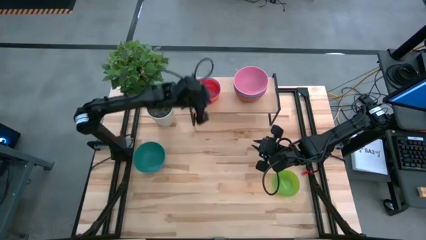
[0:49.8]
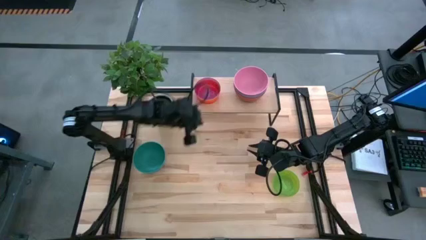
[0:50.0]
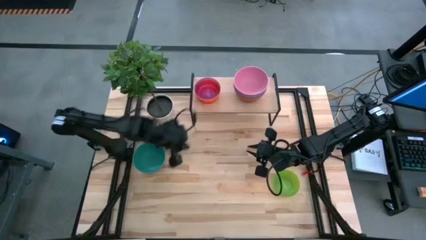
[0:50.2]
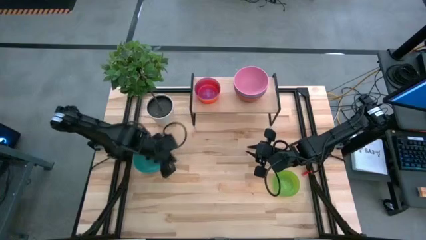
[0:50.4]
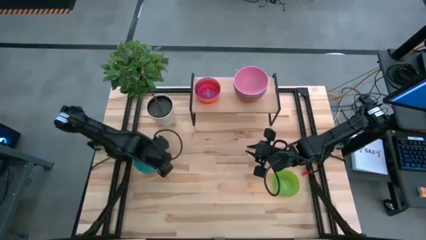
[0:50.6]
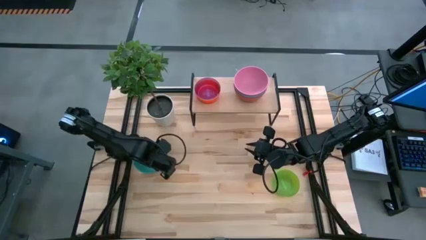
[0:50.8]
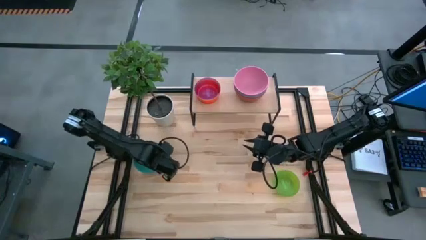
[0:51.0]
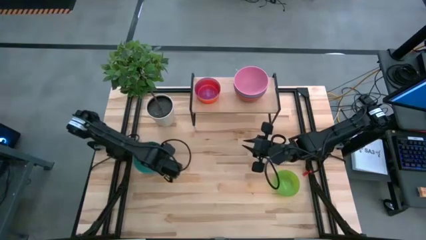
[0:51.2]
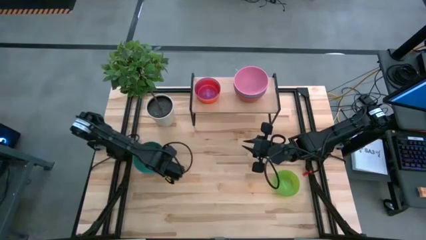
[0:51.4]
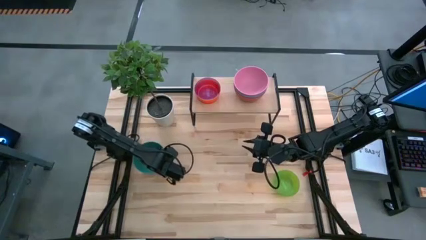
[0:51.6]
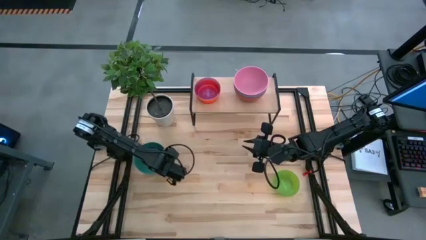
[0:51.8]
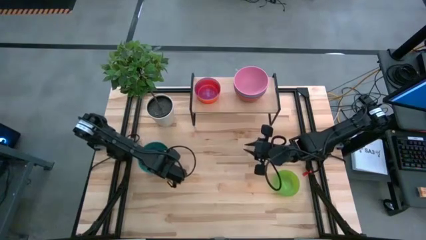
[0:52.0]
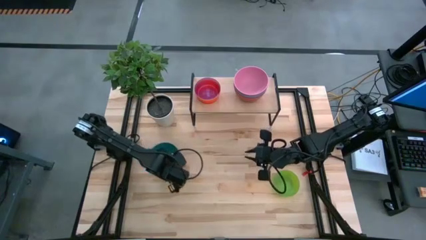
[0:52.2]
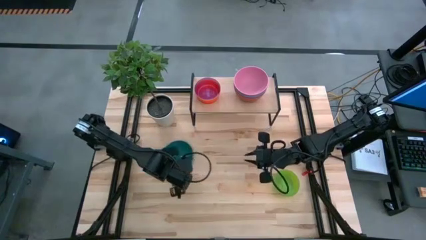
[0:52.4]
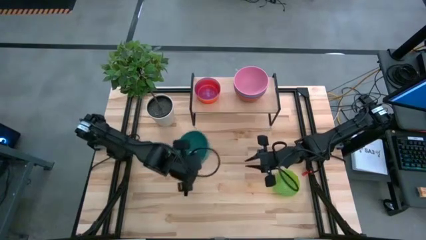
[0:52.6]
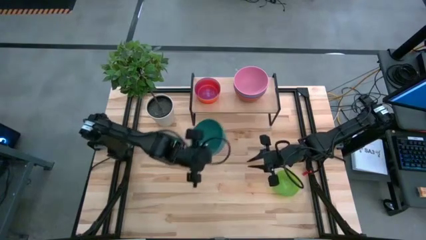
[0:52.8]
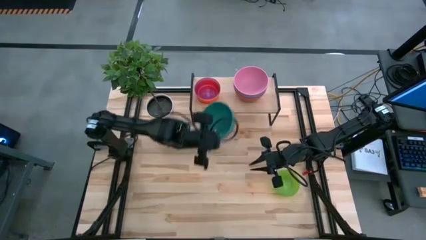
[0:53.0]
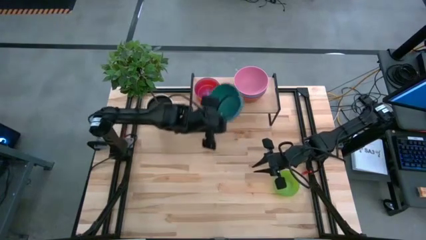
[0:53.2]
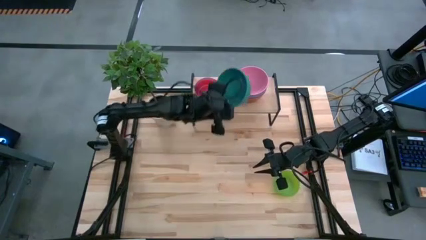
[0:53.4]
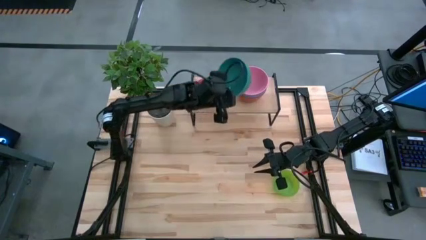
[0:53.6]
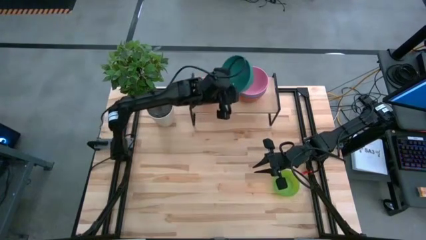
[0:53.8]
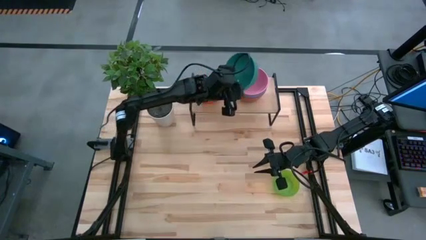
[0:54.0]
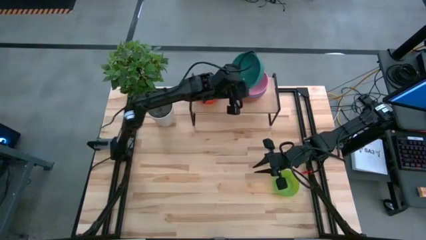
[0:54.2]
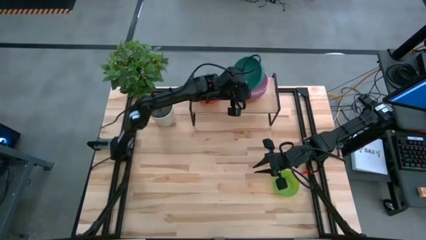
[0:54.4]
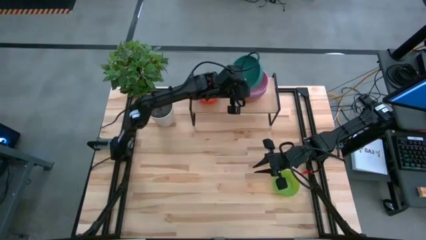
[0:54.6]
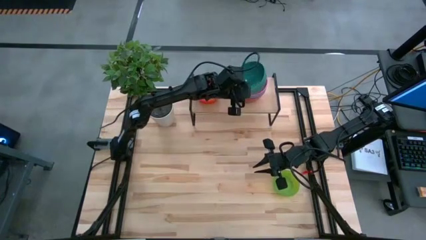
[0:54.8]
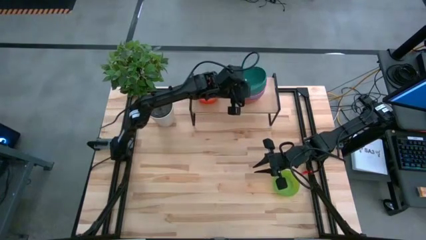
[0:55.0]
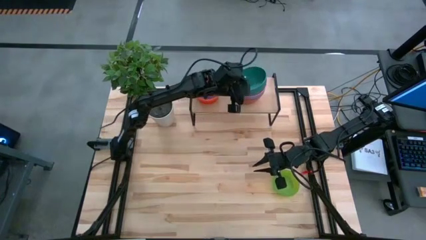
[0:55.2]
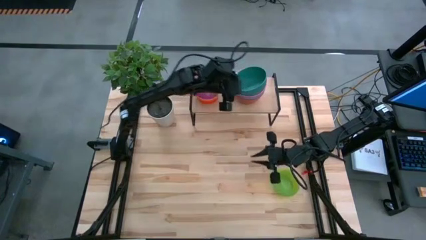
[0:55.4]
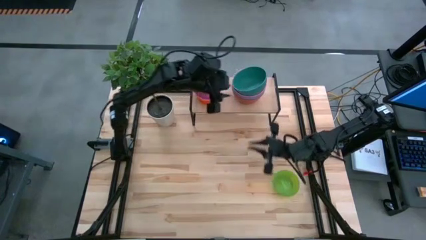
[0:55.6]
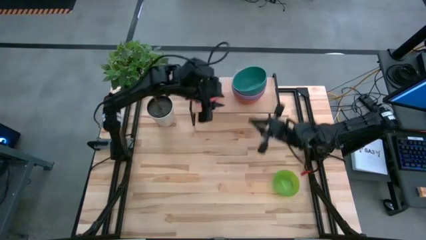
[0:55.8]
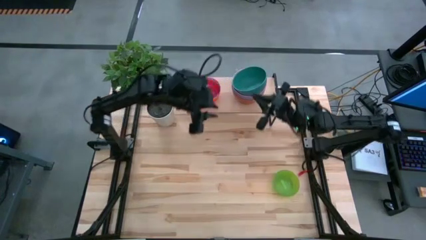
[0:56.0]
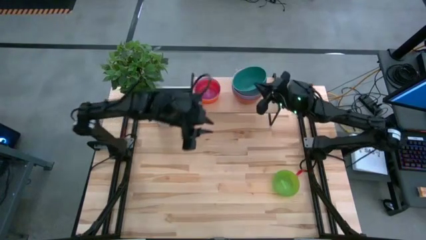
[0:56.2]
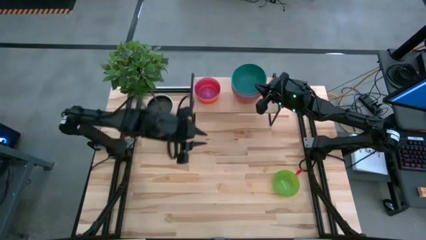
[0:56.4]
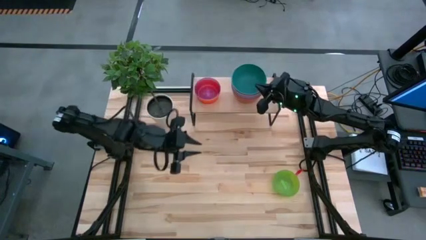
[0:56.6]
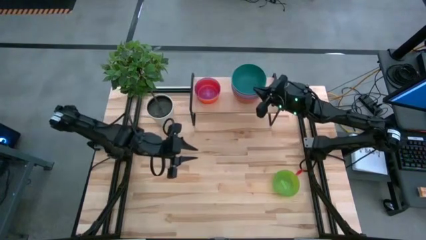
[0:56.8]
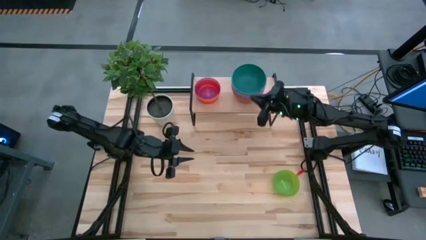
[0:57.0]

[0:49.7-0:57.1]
Task: Place and stack bowls onto a shelf
Stack the blue green bowl into the pink bowl on the shelf

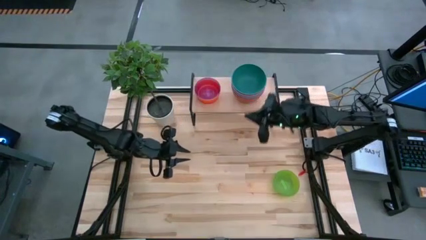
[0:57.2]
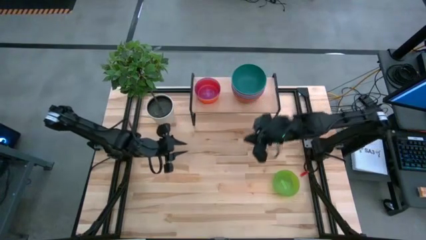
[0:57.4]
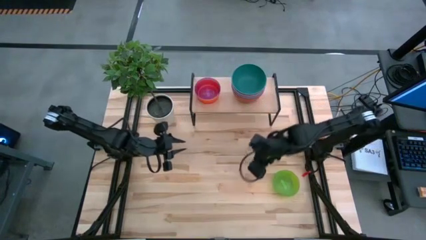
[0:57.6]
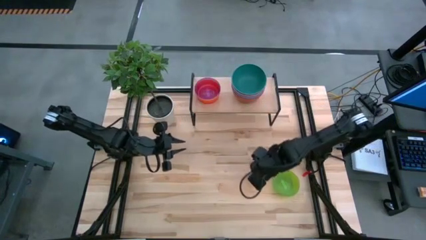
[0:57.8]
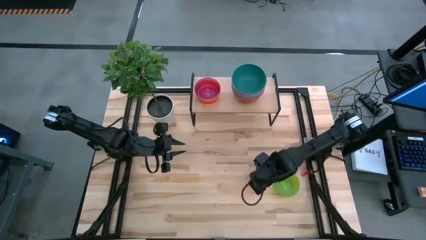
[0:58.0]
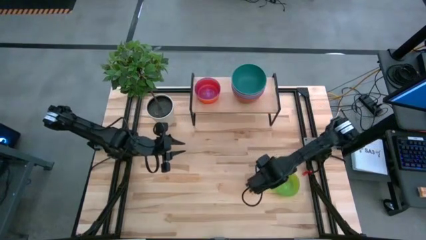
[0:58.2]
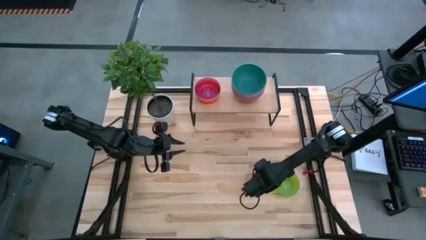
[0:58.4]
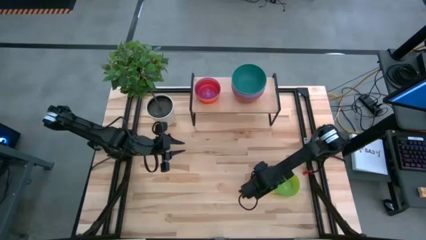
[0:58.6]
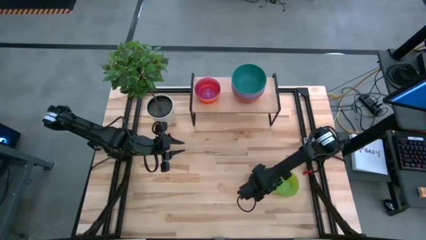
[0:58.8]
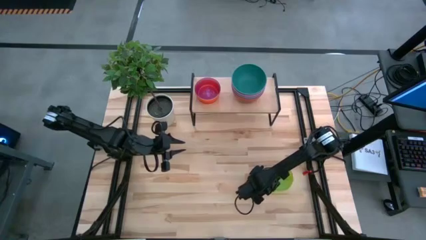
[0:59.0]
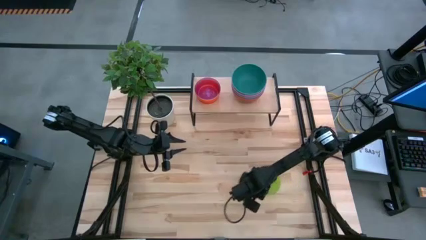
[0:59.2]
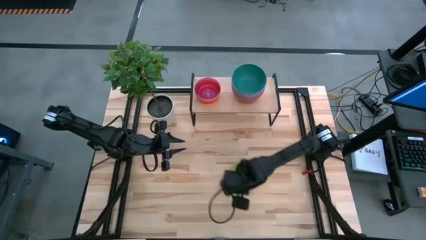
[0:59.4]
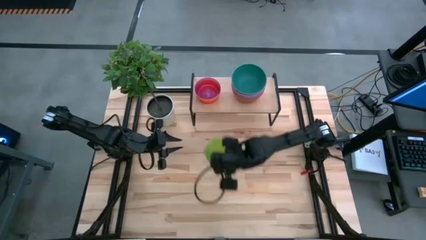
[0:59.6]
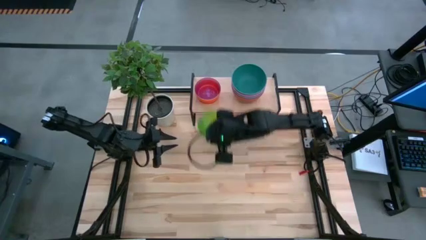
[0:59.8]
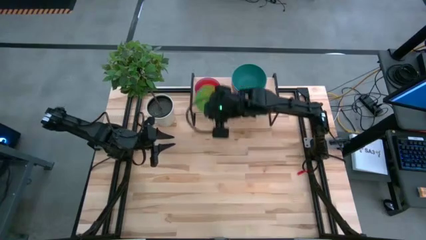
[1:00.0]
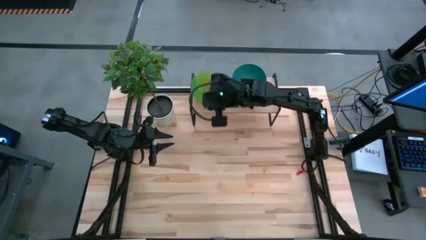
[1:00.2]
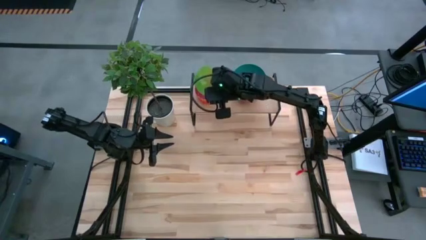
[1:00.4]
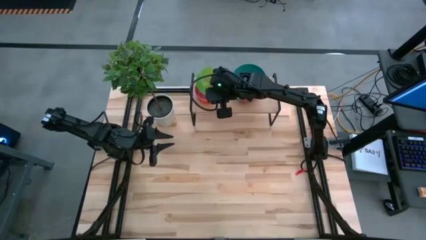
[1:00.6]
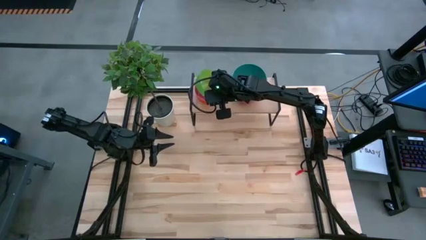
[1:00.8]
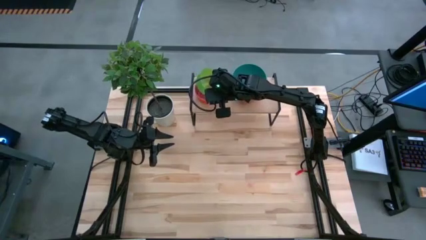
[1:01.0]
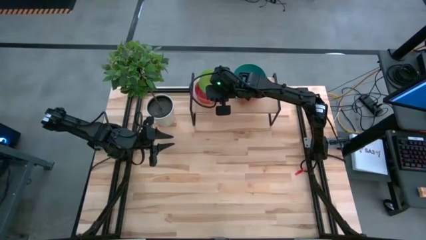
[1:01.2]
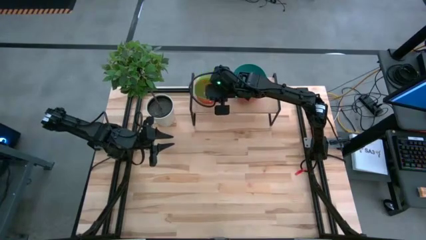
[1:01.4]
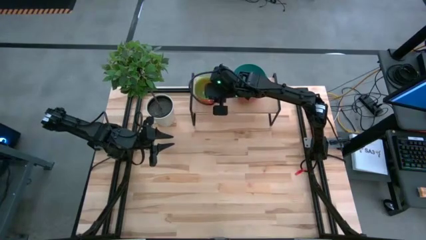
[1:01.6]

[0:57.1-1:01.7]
Stack the transparent green bowl into the purple bowl on the shelf

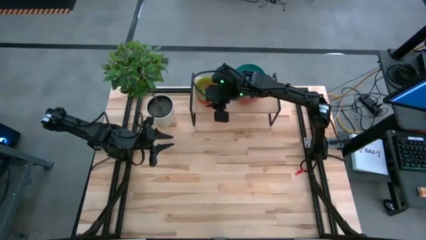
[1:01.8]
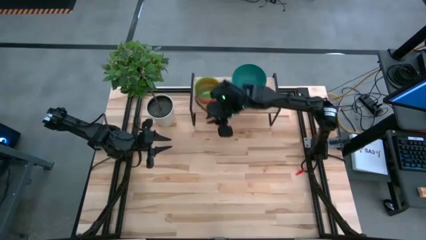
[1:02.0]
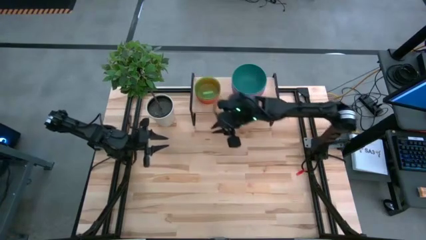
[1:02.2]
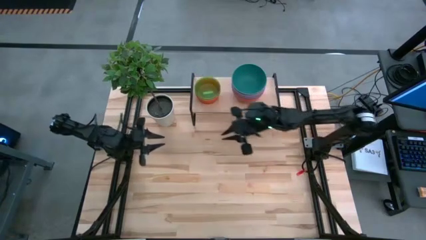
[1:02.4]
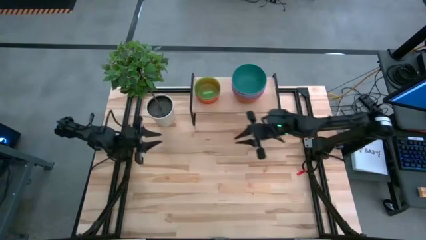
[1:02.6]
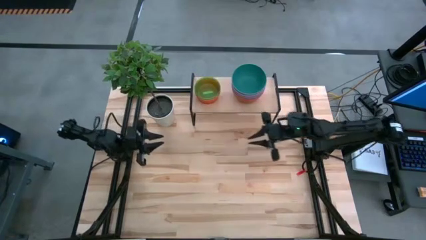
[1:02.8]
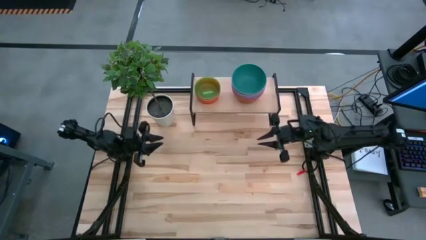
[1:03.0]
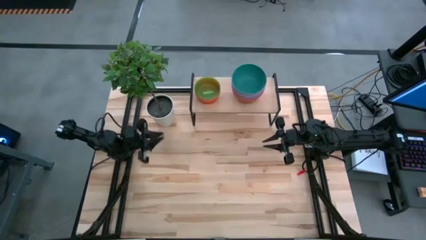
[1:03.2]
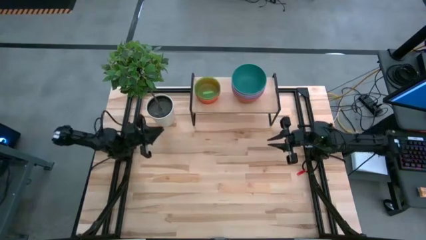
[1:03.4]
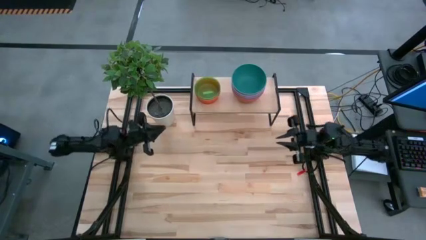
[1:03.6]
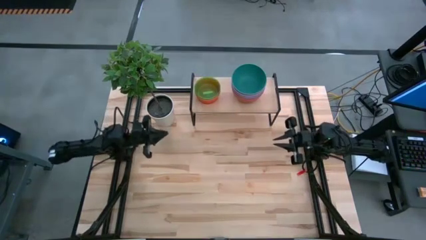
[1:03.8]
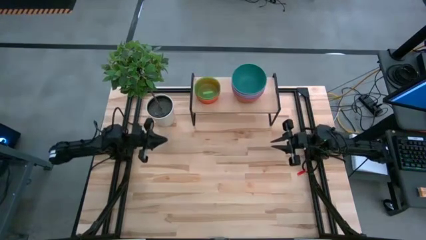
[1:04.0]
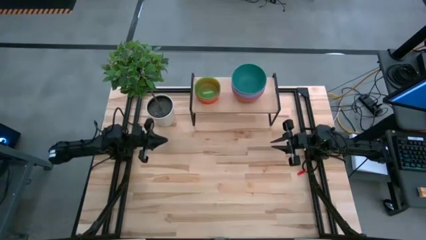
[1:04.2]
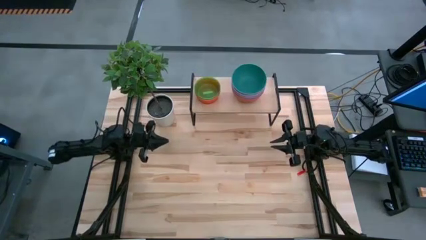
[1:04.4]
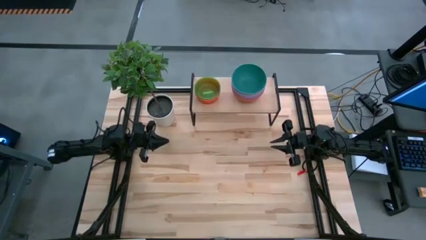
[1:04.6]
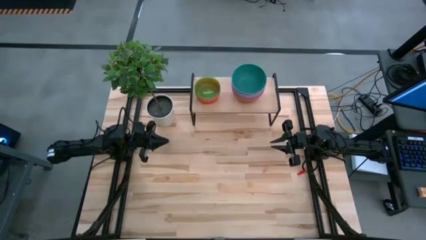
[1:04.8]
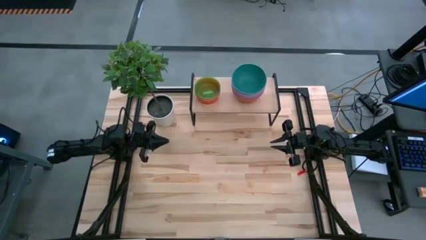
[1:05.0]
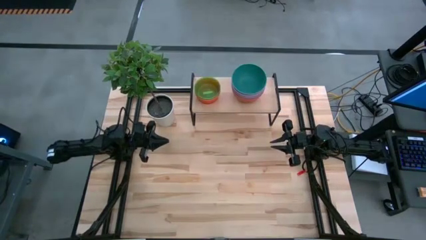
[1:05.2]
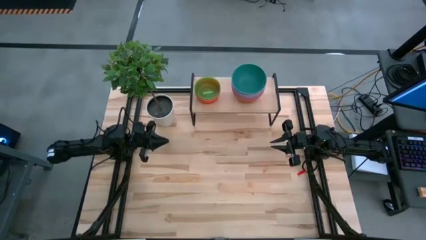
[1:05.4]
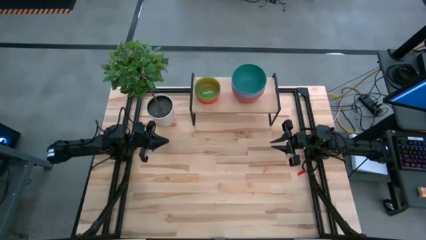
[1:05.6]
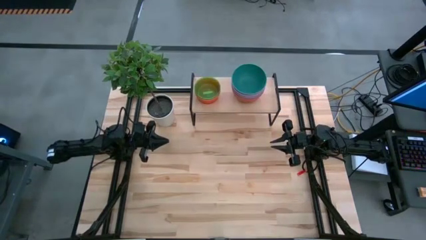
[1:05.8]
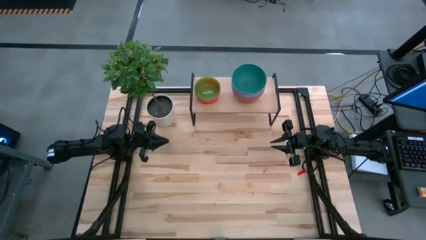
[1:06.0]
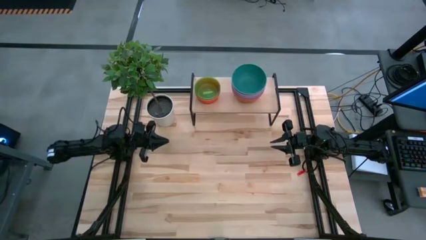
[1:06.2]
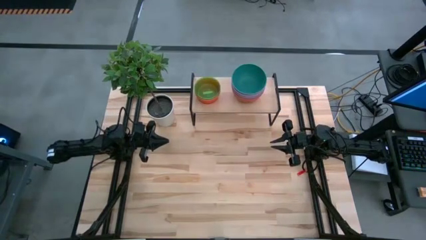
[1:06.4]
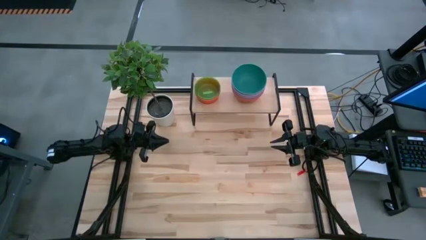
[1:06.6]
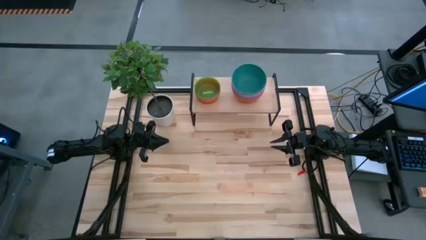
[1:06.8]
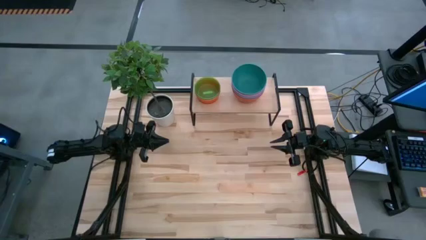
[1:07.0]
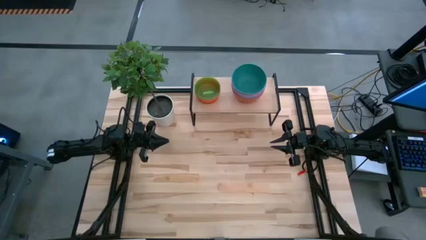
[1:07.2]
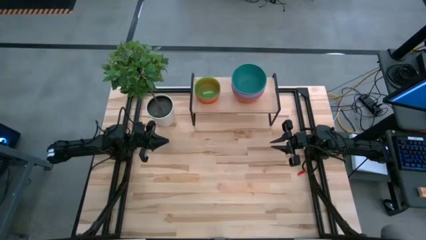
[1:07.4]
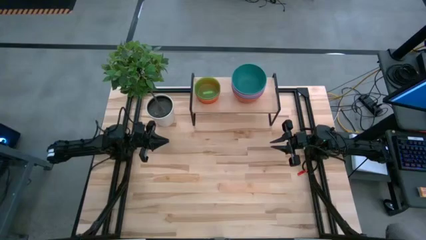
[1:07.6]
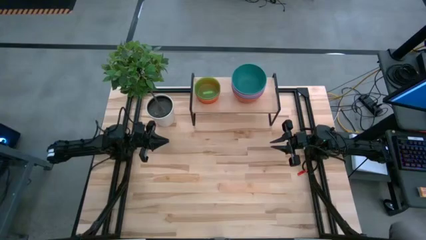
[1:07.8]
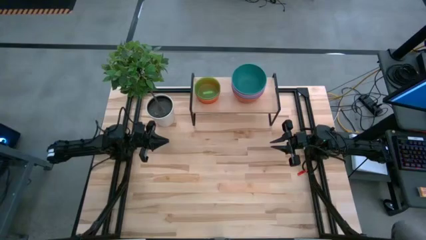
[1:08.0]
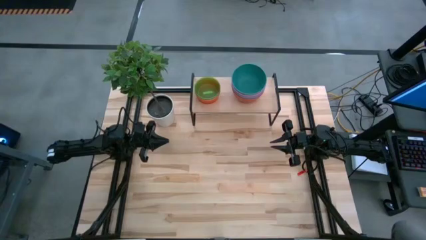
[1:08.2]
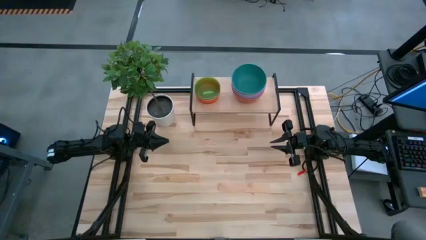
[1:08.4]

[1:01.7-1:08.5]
Return to Home Position
